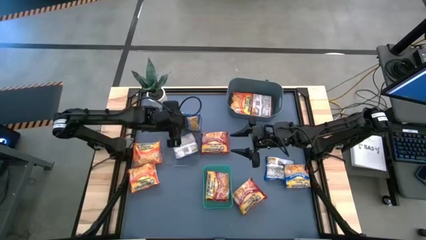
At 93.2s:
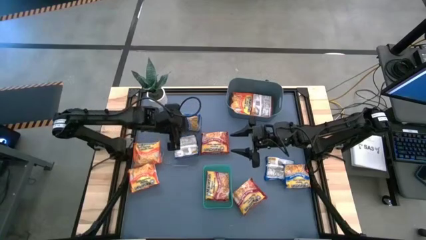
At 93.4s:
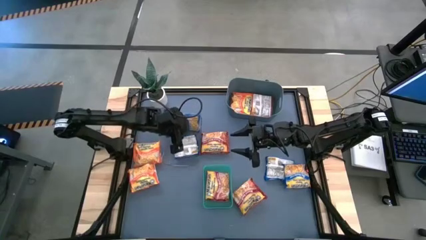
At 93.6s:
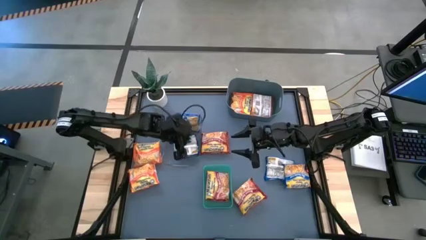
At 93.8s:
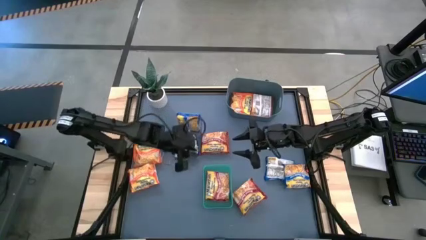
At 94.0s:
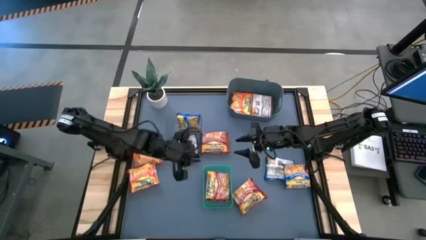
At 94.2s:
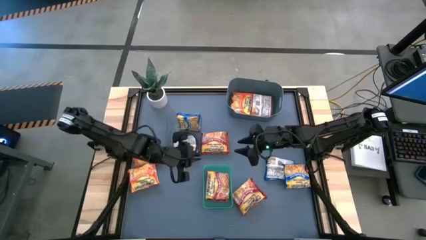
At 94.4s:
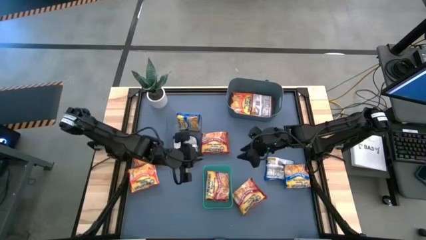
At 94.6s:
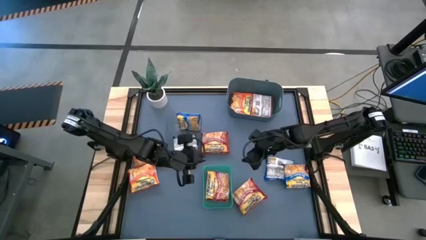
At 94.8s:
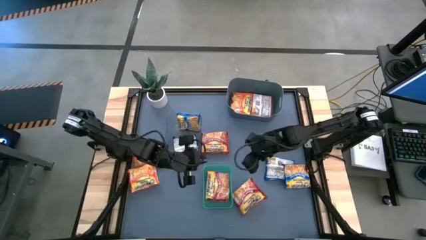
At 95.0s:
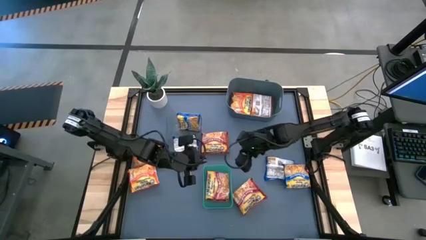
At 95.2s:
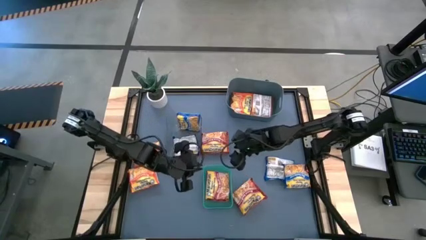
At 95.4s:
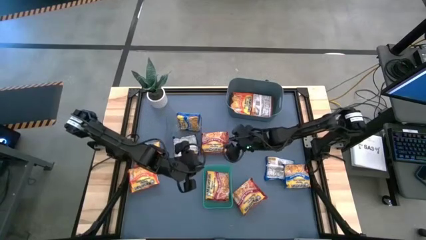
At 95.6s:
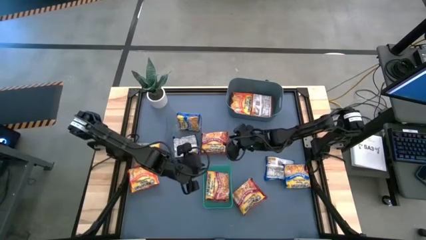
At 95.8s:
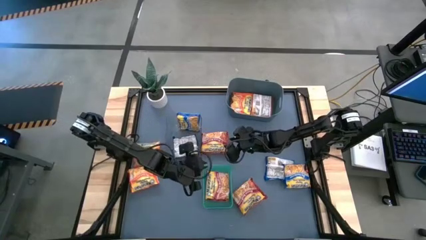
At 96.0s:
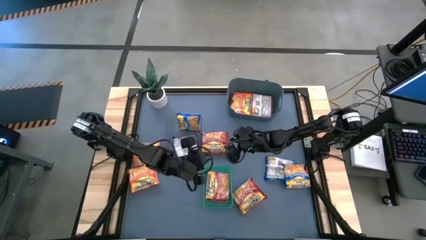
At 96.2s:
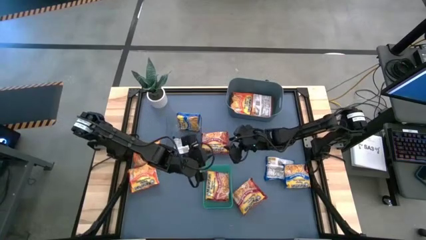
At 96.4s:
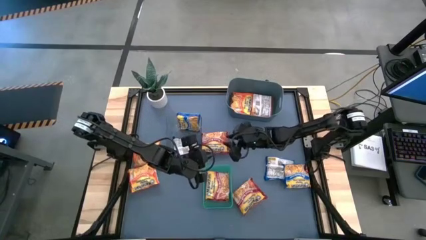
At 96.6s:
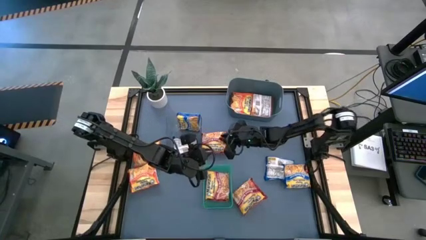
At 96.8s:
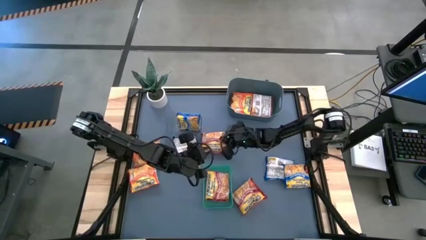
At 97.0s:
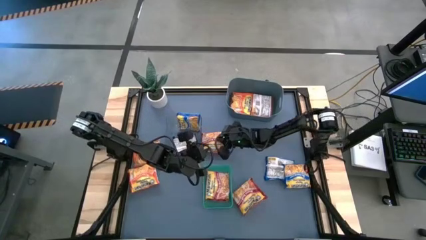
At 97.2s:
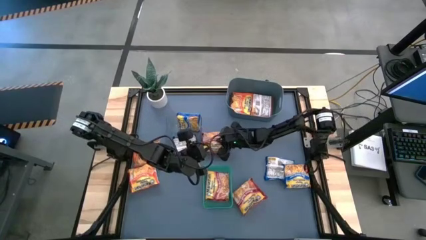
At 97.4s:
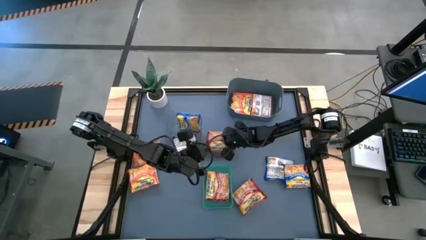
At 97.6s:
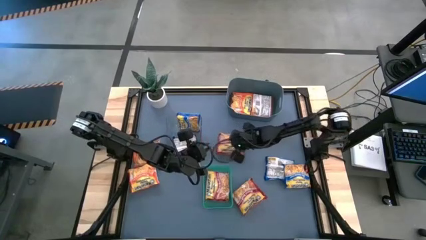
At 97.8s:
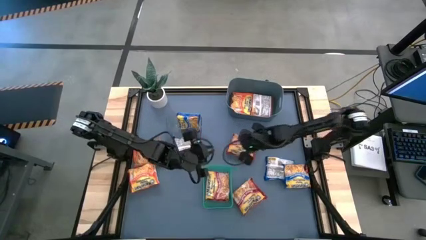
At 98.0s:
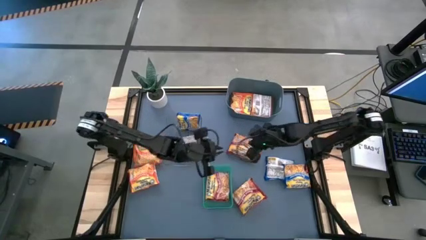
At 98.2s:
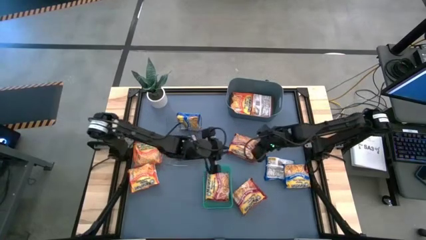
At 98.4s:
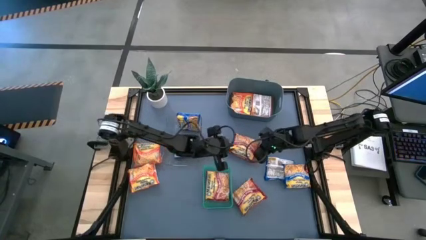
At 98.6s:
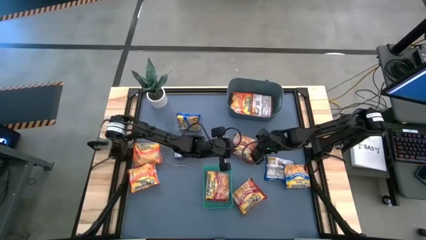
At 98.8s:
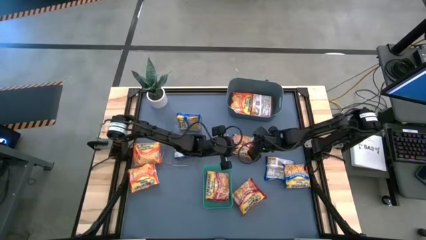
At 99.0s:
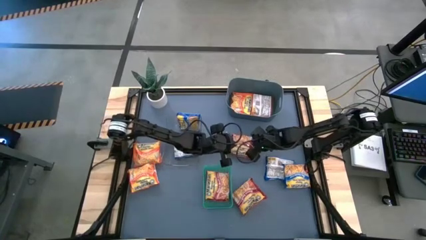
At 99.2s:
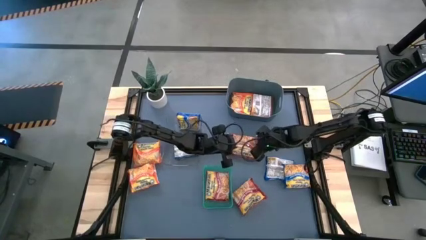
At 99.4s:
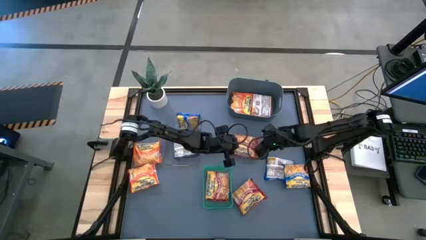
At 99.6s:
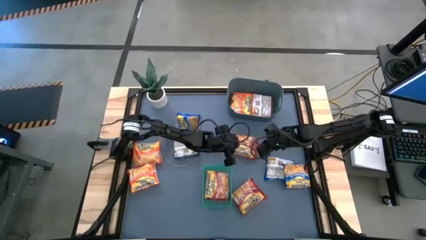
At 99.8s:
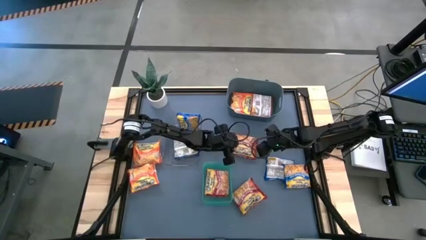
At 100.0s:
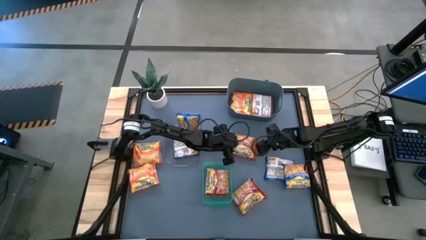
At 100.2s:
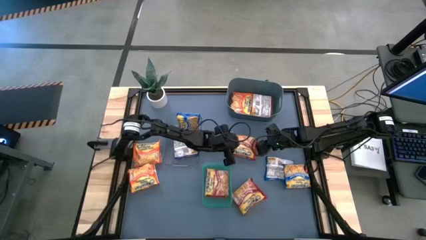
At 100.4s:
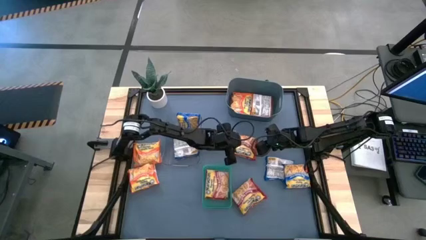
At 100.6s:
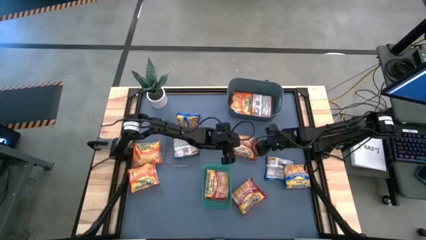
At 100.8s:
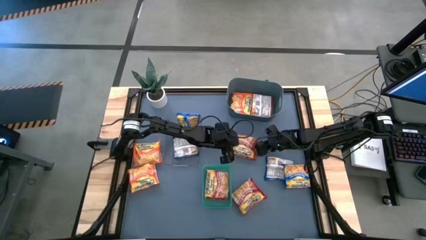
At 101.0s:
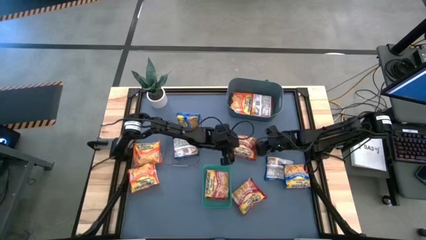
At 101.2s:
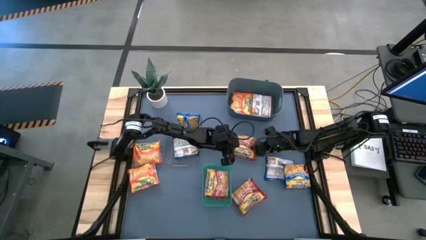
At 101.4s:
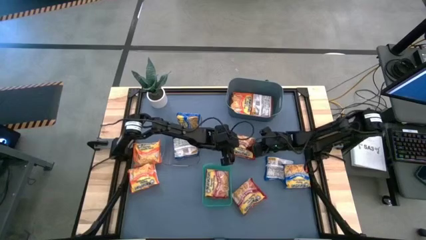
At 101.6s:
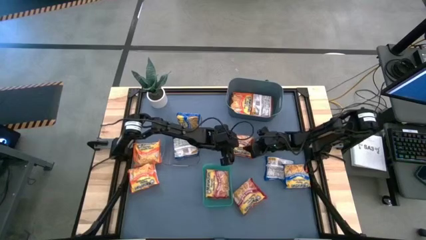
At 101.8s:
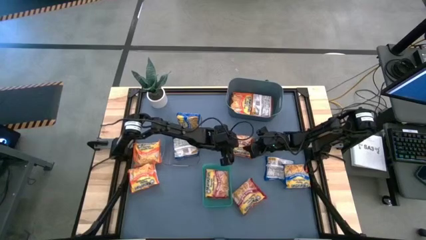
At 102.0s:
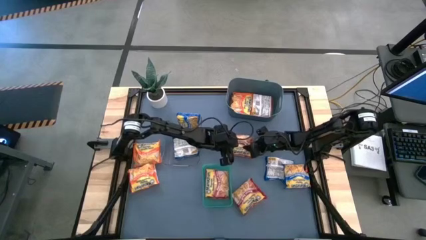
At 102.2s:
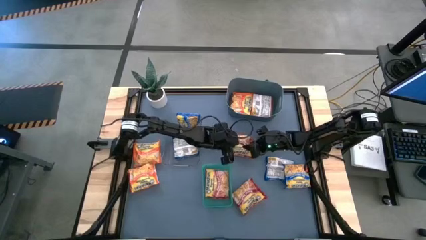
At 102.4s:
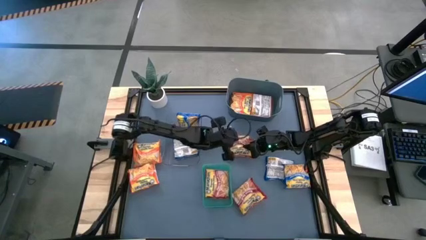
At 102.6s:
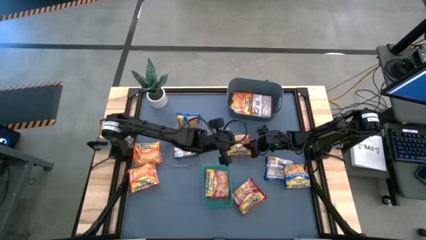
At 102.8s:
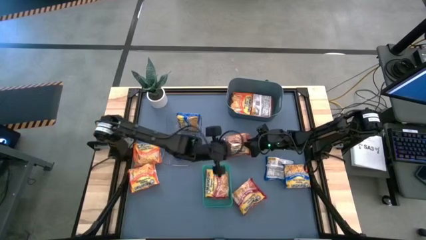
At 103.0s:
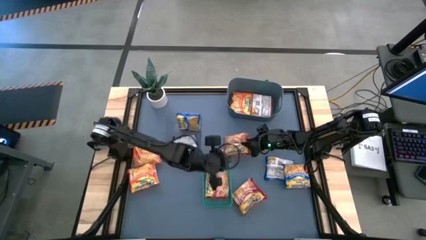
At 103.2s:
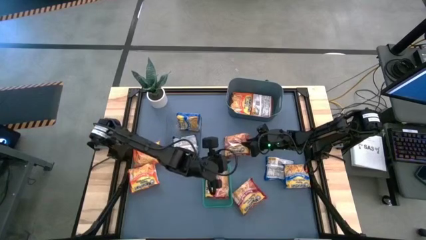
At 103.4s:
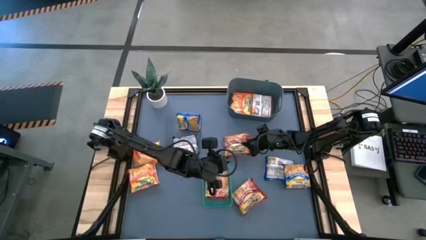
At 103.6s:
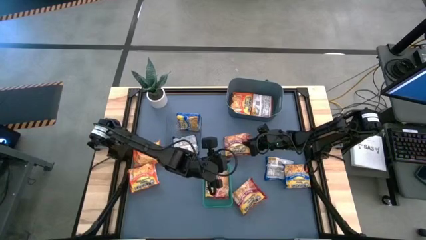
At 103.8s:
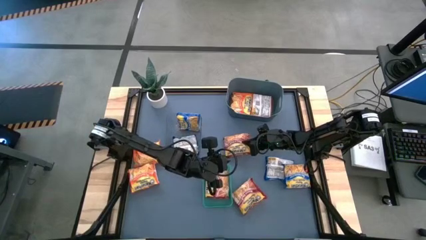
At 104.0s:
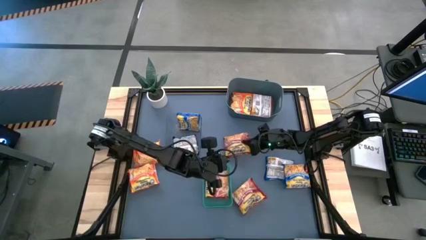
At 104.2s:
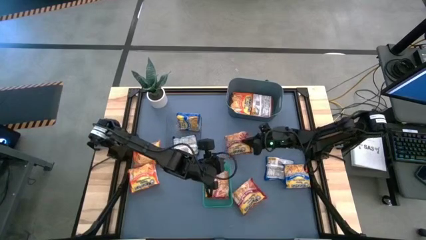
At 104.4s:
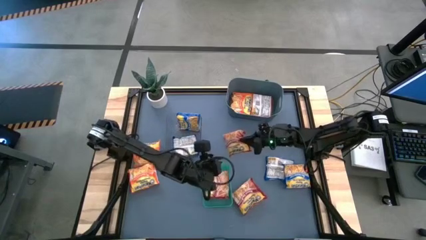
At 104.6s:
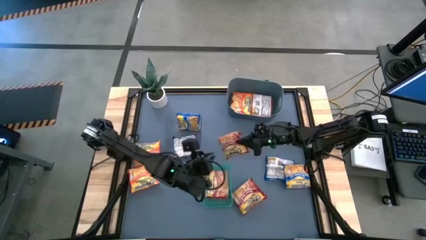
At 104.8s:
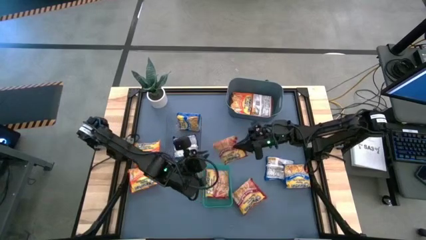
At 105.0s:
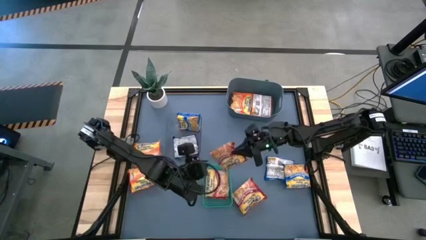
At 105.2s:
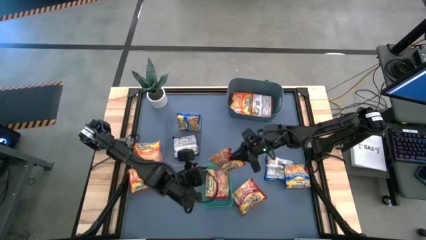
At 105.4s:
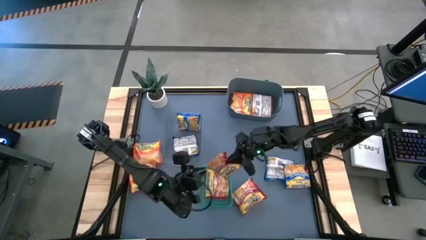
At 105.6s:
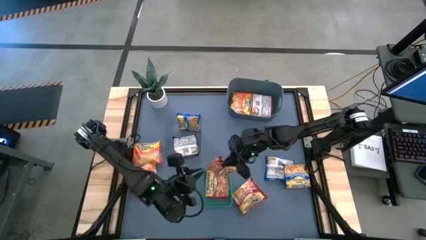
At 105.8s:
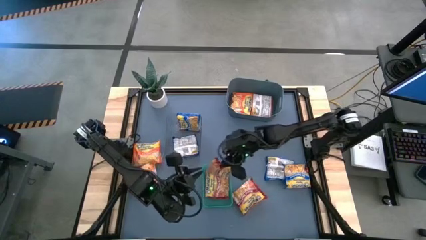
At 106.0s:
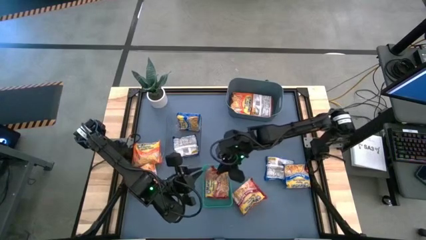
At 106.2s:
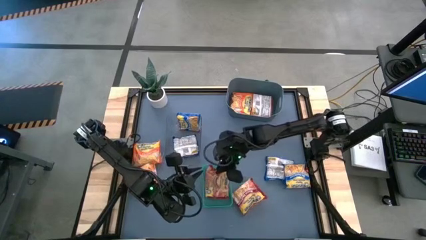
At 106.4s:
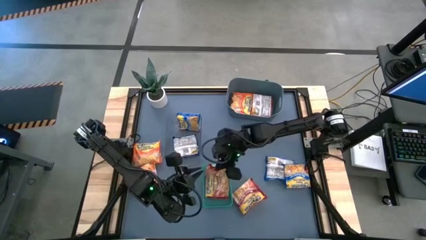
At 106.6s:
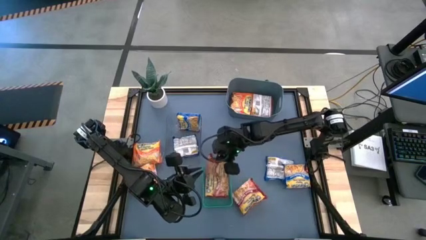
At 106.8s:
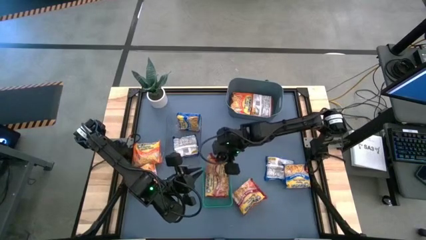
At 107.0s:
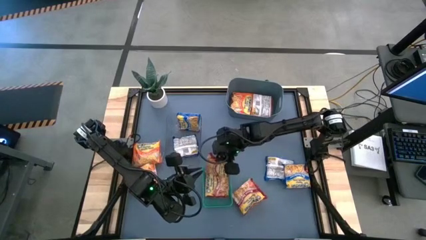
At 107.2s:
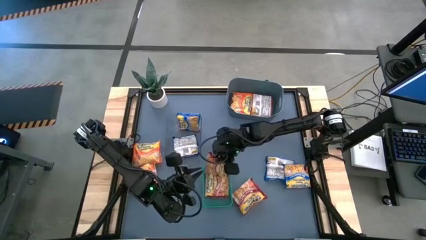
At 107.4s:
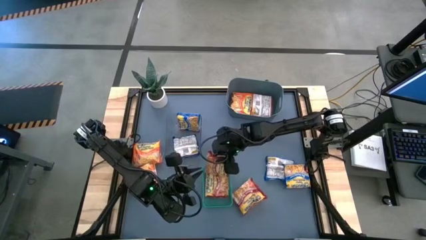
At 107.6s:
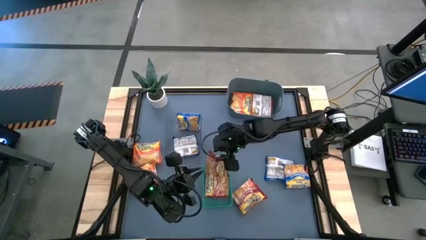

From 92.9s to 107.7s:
Task: Sort Maruchan noodles
Put the red noodle pack into the green bin

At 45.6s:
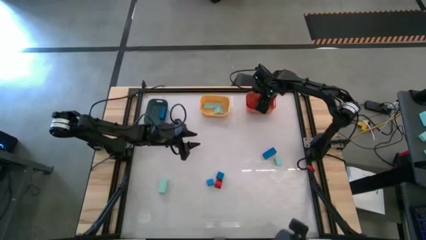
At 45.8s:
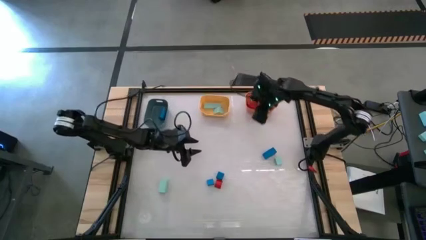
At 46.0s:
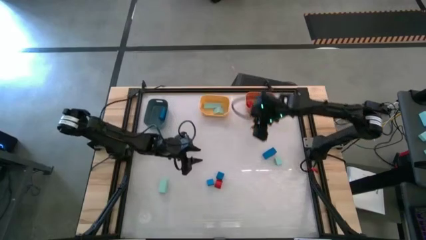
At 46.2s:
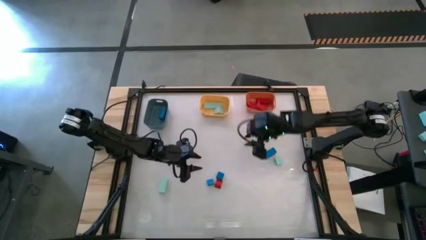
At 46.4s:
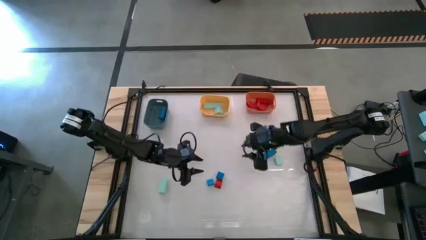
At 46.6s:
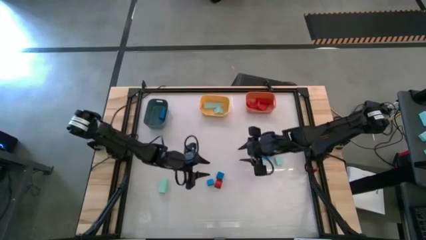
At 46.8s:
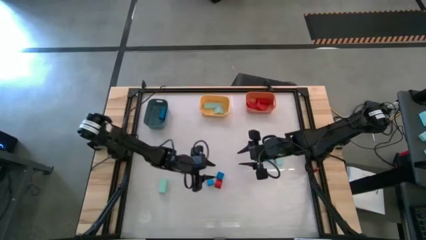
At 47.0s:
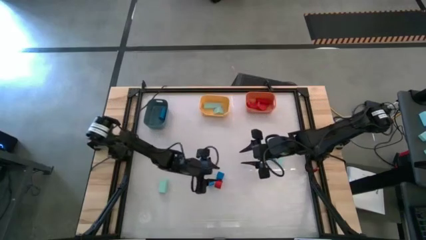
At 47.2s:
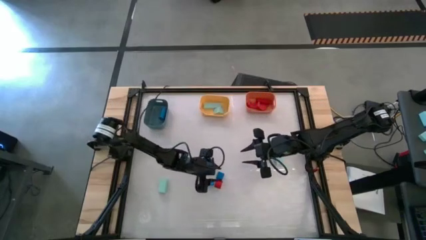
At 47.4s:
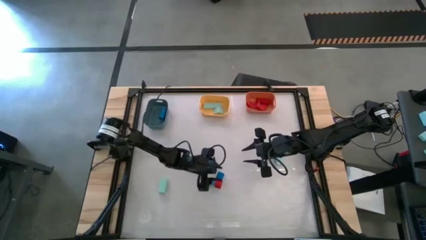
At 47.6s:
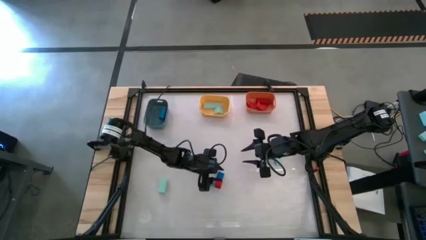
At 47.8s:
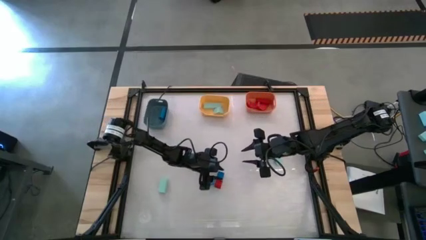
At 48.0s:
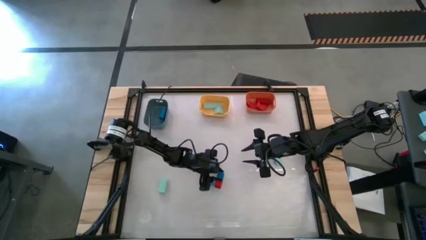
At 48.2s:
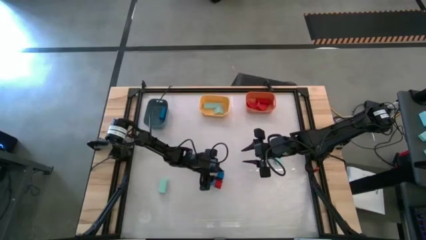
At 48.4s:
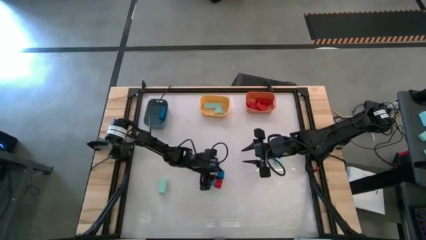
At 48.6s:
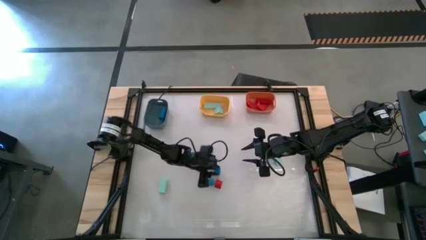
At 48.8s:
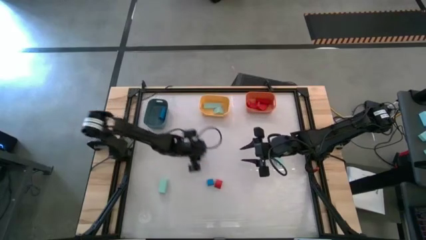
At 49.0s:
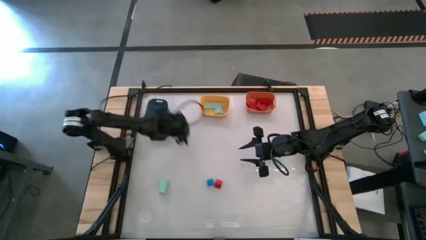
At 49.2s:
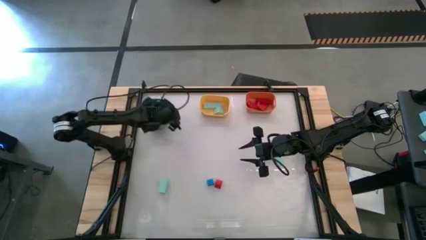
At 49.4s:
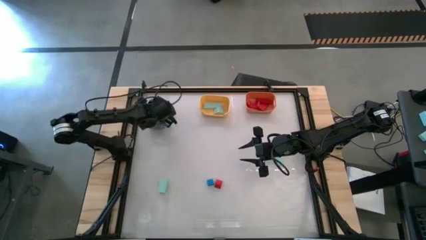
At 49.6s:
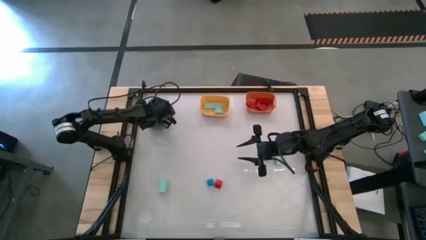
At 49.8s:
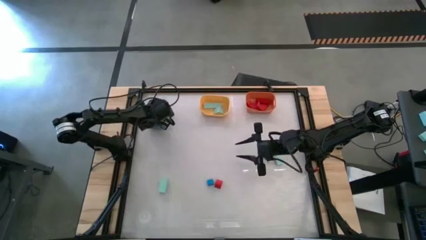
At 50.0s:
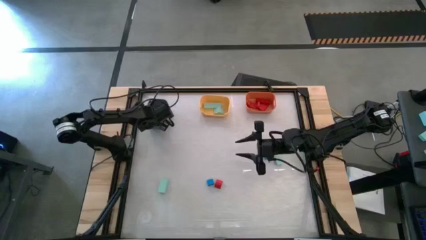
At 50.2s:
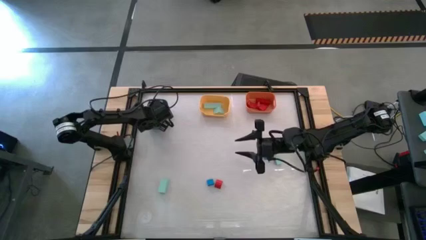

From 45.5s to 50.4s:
Task: Sort & place blocks by color
Put the square blue block into the dark blue bin
